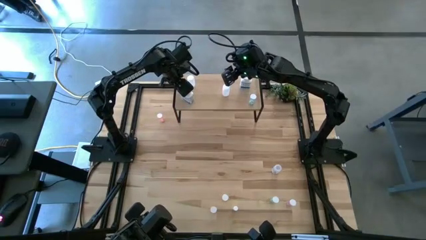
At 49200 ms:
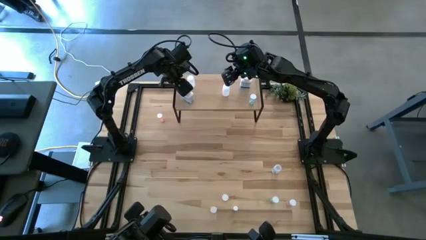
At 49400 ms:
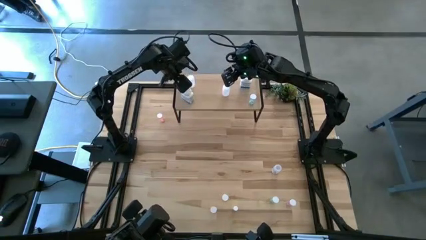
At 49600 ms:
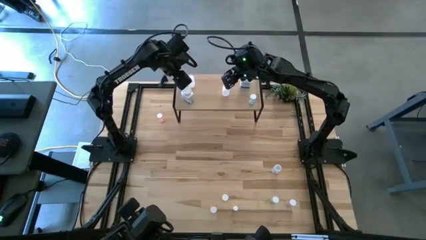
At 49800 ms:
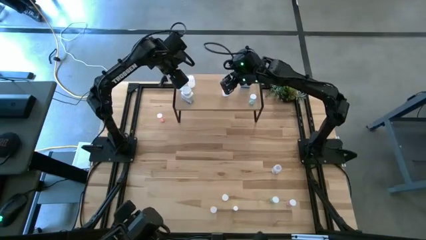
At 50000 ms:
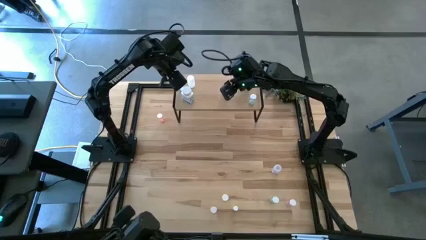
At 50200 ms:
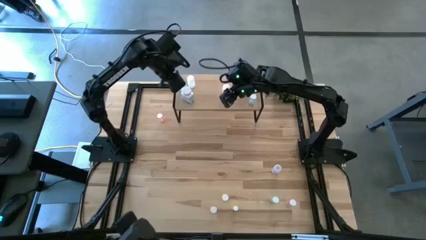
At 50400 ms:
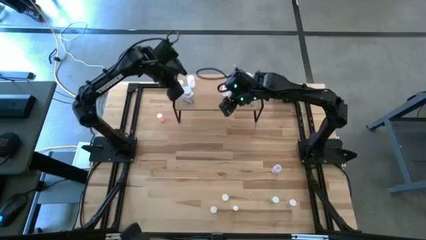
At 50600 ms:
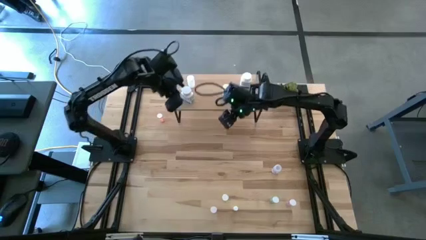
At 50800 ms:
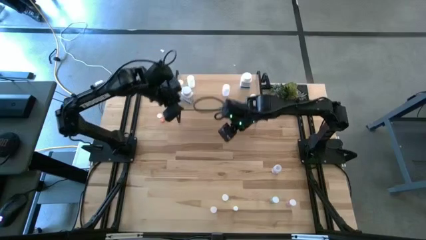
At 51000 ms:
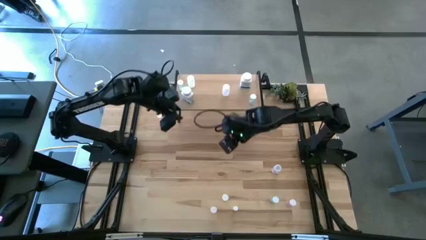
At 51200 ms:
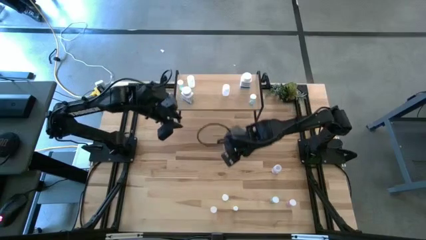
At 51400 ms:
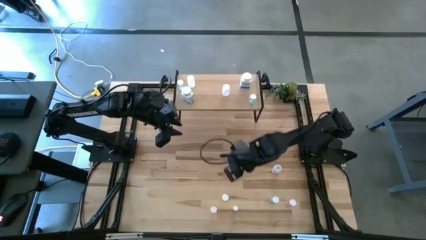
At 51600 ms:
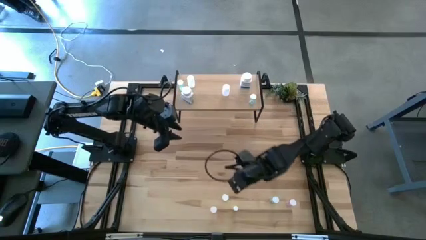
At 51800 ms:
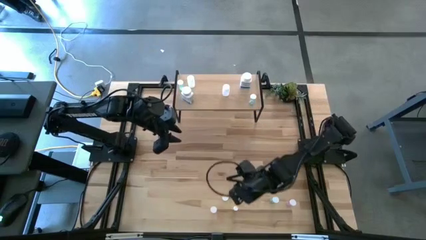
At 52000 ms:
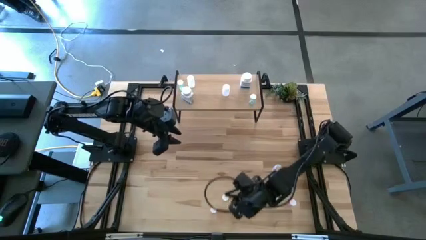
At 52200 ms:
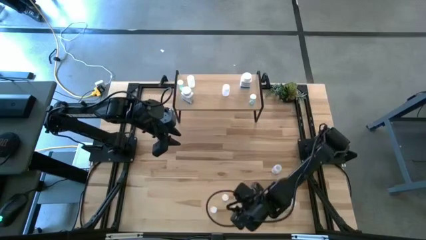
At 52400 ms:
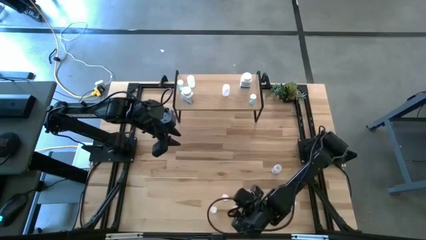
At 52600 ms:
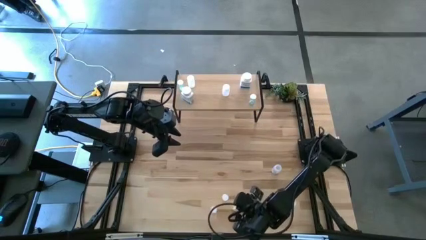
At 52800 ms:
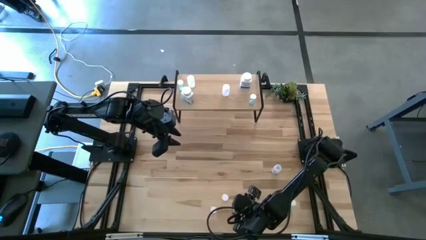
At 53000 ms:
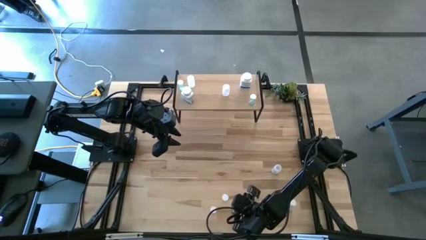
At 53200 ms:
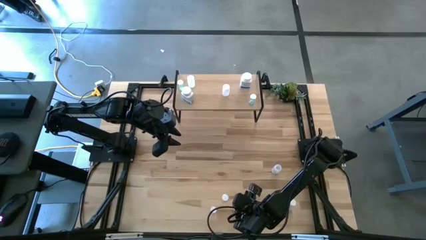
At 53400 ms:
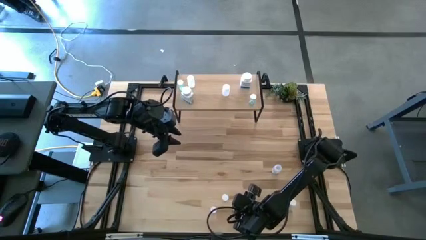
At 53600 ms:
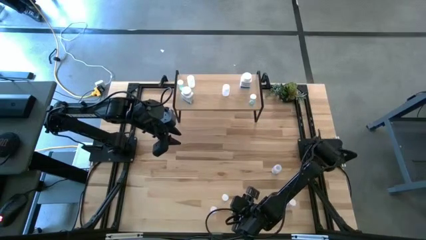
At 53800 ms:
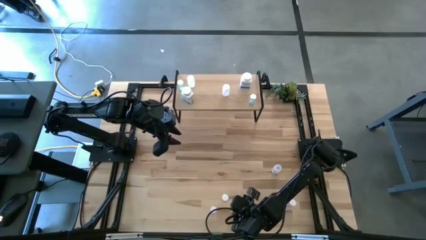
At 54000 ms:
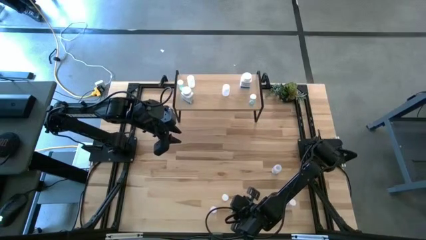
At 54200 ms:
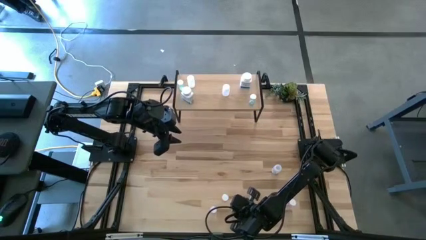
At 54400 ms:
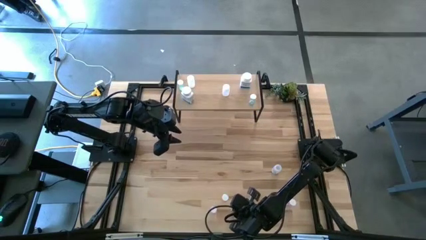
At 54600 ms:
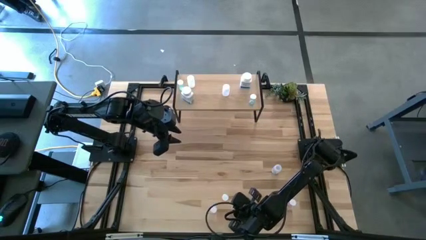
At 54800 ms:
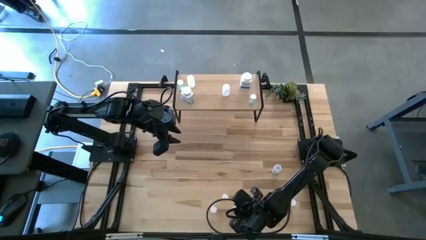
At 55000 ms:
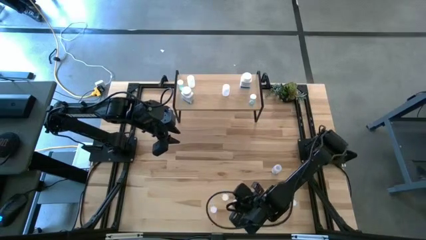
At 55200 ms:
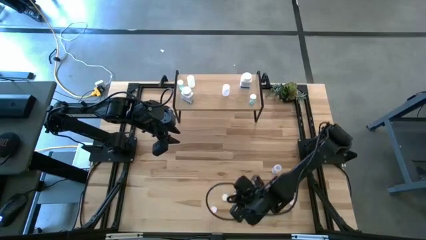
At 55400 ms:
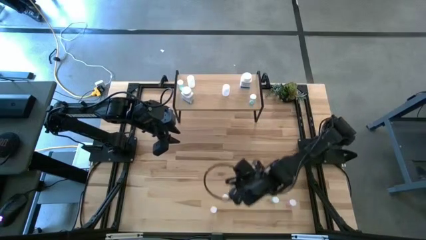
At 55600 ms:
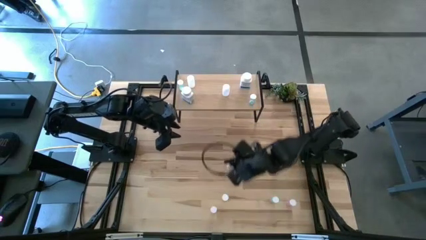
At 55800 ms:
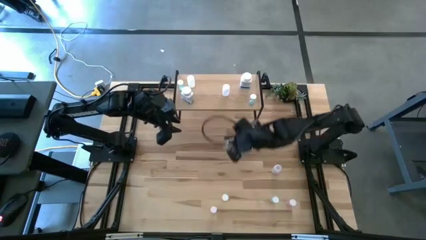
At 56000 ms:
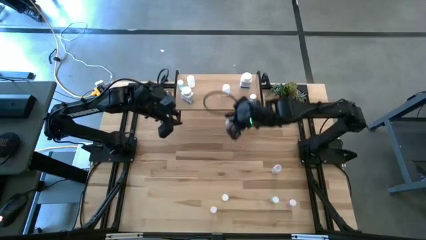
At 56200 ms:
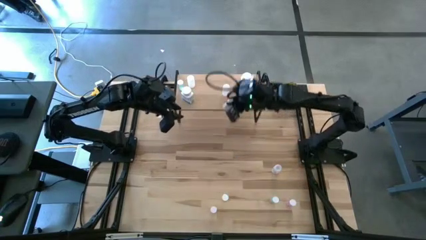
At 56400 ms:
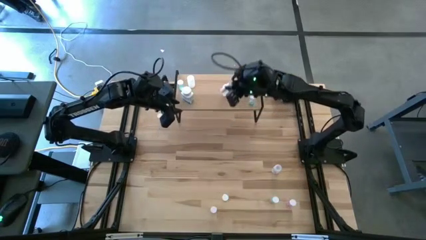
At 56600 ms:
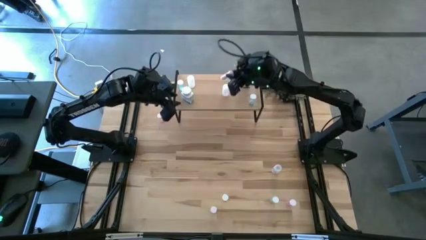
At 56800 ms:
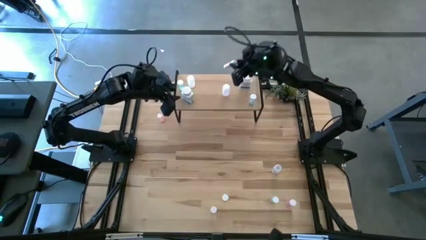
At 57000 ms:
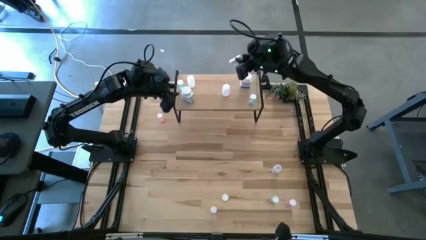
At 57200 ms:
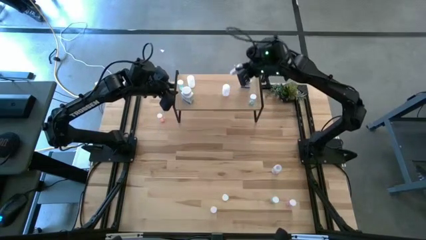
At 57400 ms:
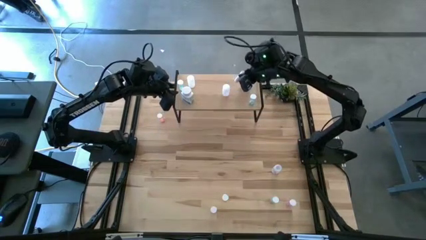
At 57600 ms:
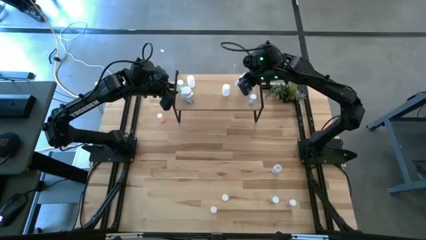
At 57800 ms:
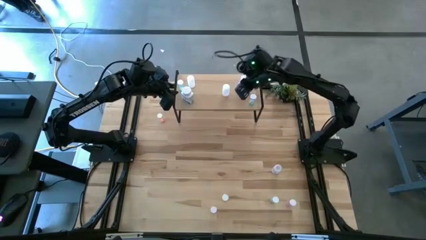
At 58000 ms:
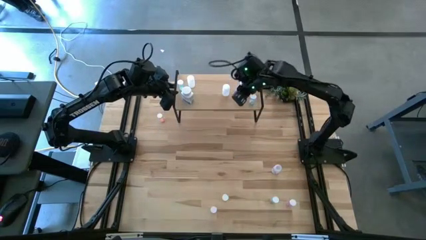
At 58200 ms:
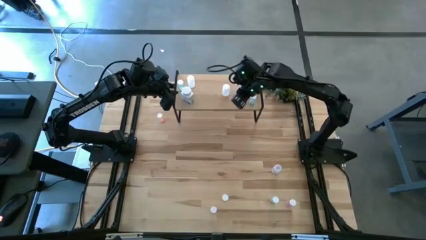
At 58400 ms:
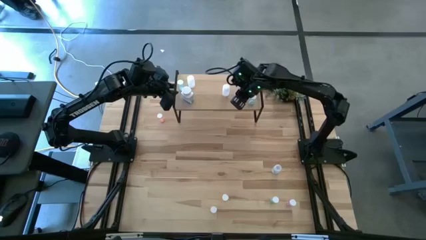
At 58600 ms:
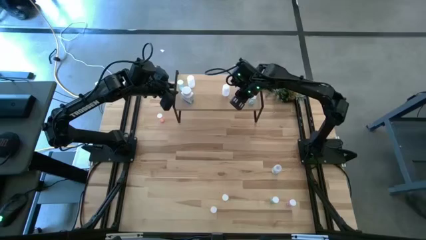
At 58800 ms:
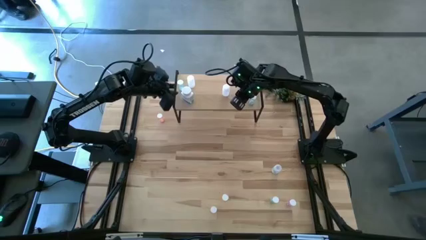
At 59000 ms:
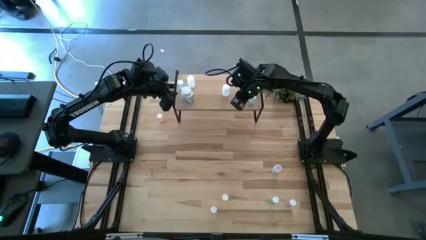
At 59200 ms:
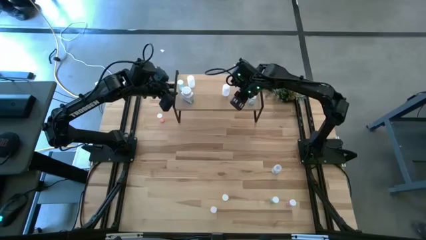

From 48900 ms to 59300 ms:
Task: Pick and place medicine bottles onto shelf by color
Put the small white pill bottle on the shelf

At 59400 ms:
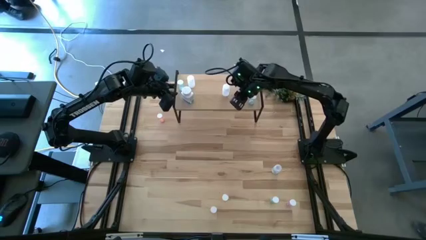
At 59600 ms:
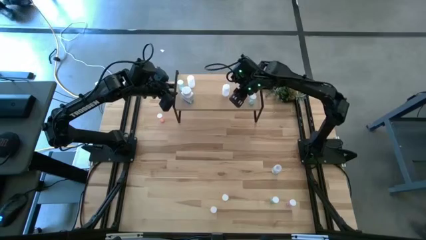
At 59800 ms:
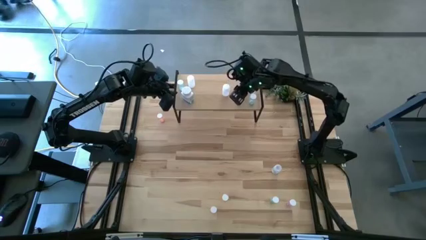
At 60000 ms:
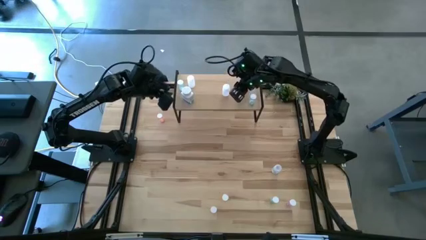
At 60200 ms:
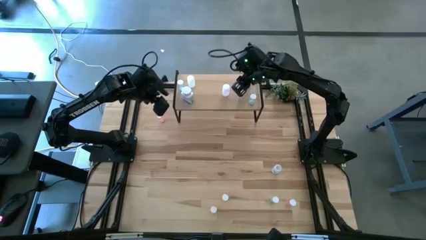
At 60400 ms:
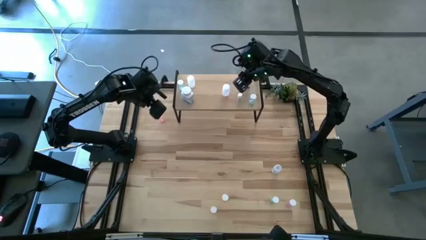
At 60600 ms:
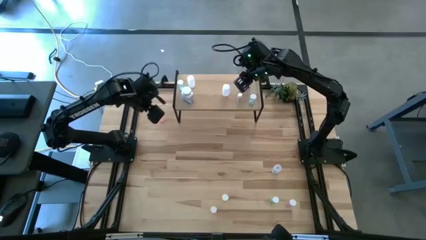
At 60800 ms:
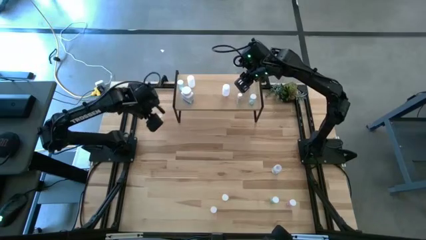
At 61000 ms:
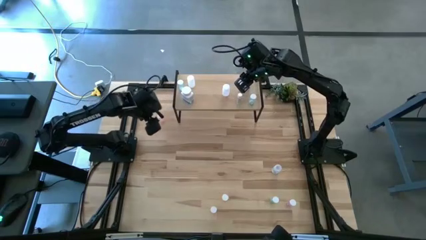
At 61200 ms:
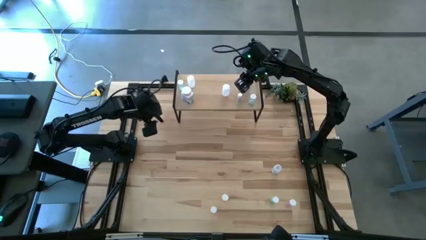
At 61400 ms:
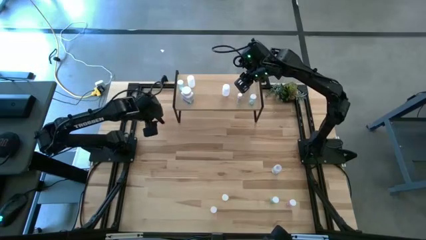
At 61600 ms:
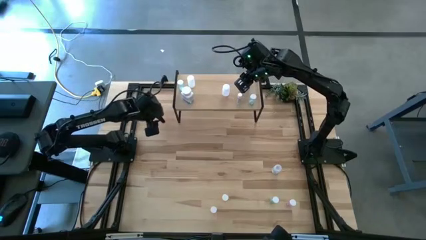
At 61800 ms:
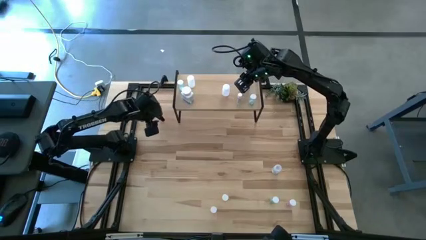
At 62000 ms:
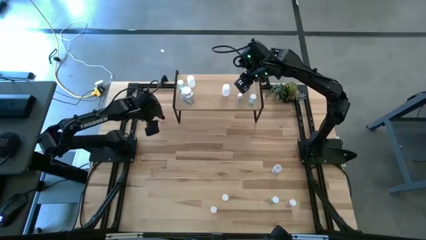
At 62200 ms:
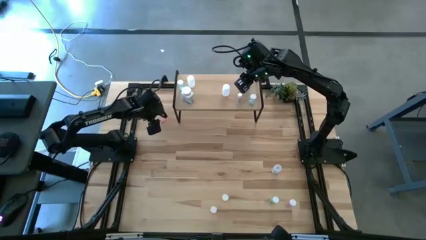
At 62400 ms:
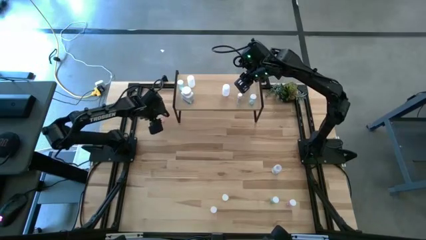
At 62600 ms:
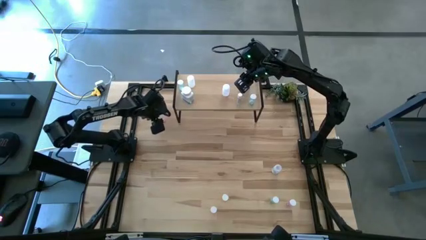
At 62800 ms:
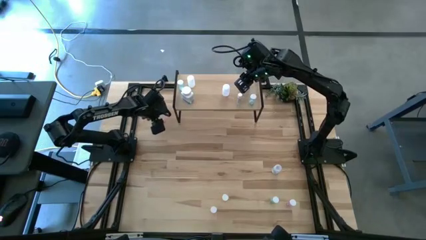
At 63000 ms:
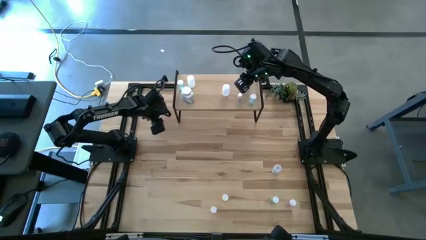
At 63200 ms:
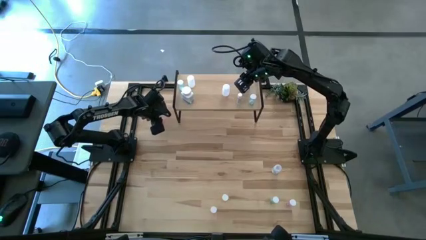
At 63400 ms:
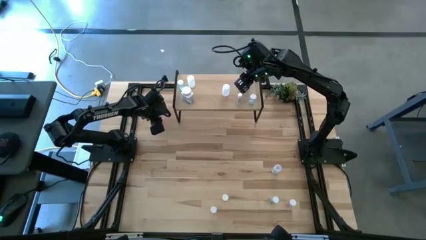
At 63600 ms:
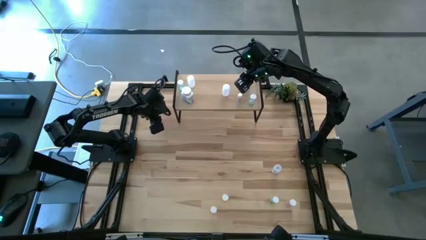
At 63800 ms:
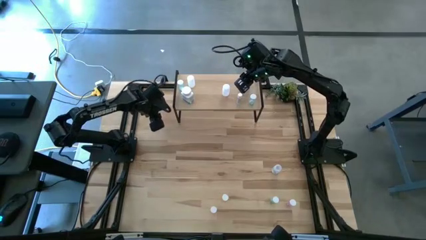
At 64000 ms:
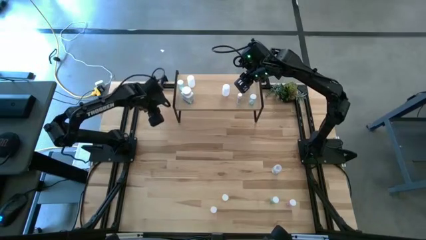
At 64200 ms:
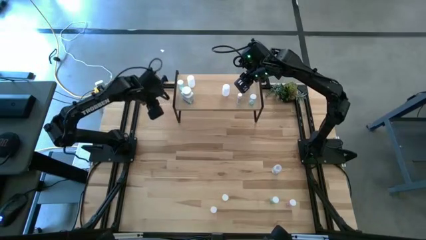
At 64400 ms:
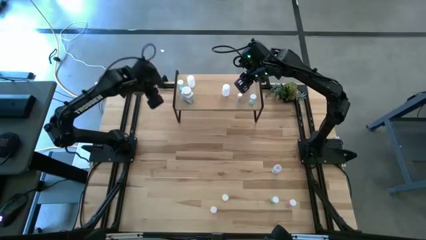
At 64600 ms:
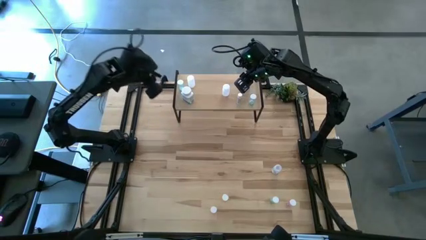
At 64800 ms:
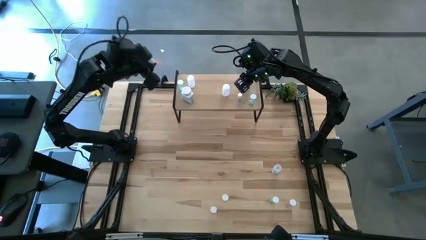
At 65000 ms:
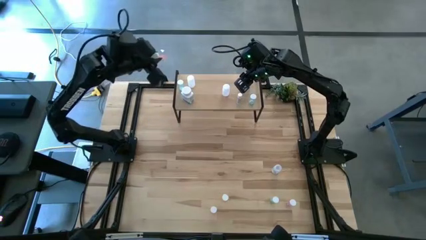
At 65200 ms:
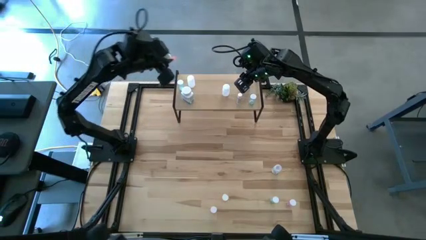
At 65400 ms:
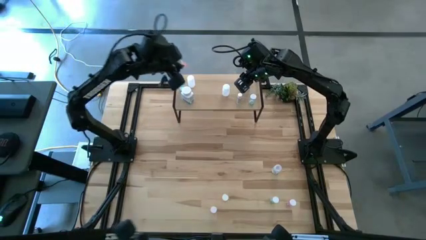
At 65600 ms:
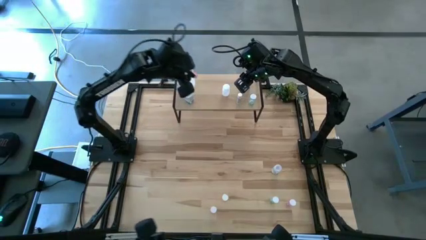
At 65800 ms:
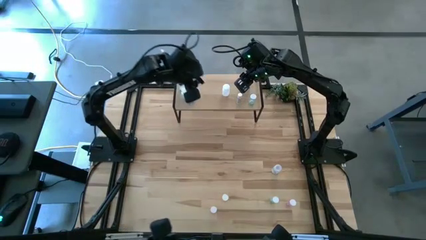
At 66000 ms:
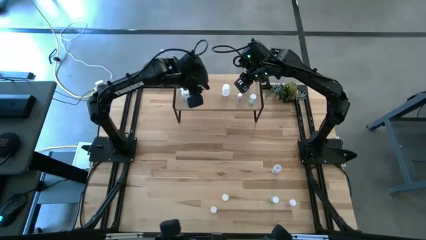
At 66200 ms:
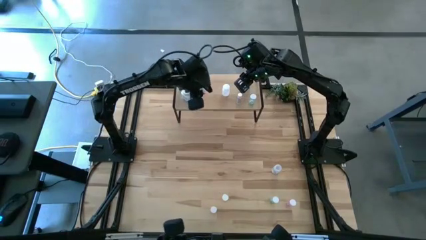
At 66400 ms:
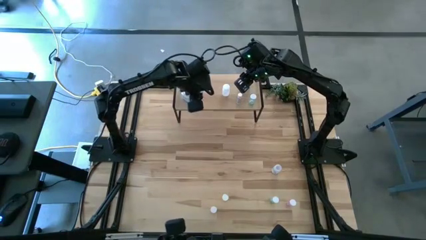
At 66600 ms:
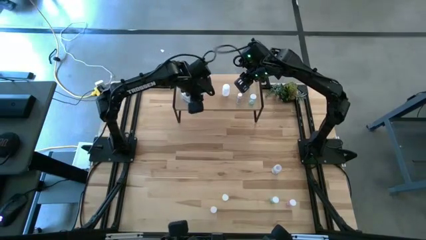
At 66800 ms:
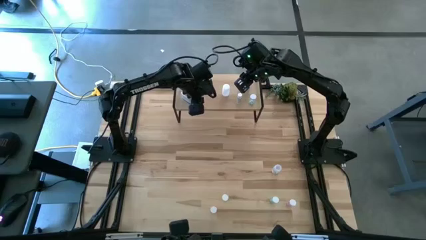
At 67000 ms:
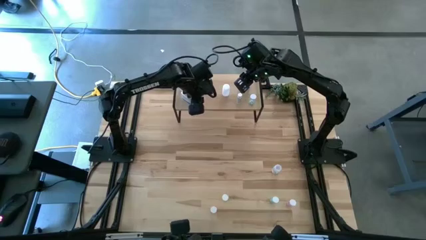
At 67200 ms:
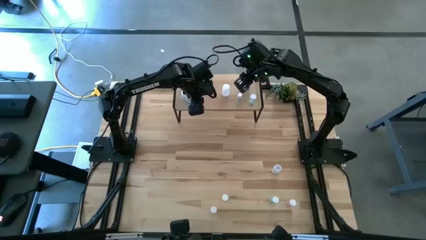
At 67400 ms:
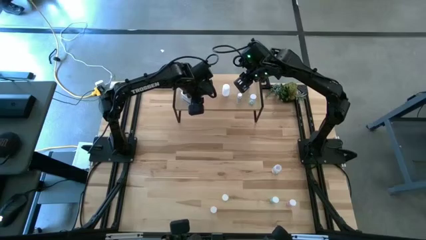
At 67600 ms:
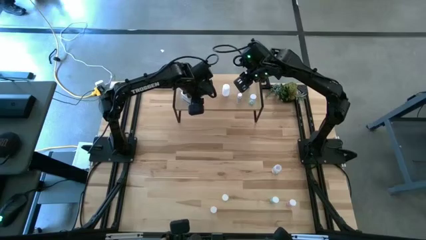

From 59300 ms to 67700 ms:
Put the top left red transparent pill bottle on the shelf
